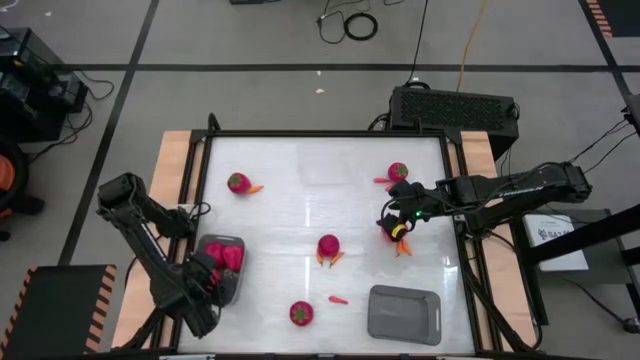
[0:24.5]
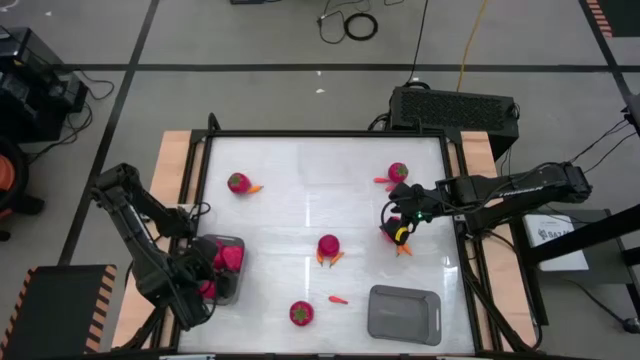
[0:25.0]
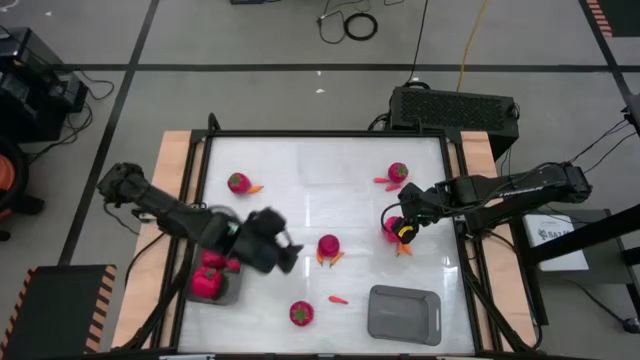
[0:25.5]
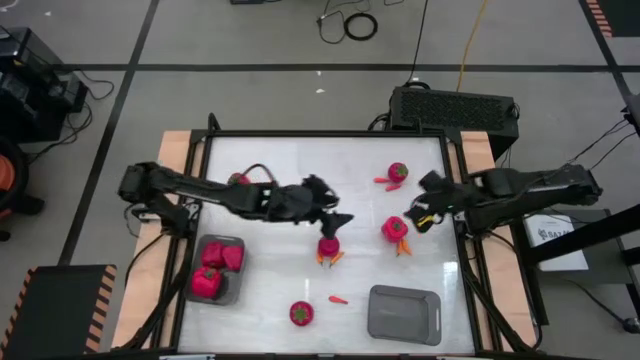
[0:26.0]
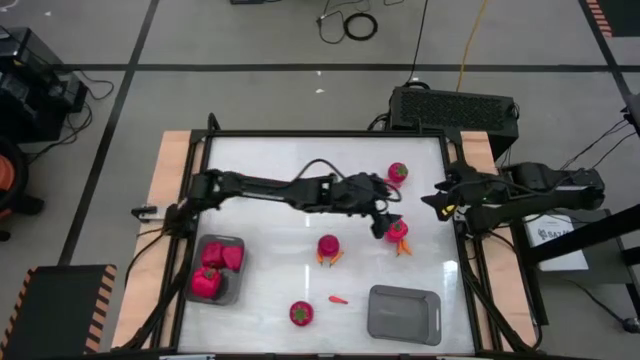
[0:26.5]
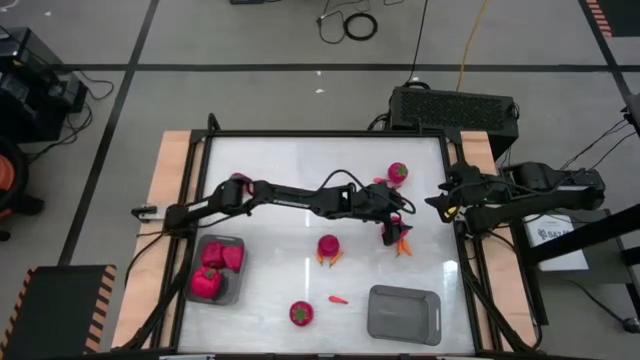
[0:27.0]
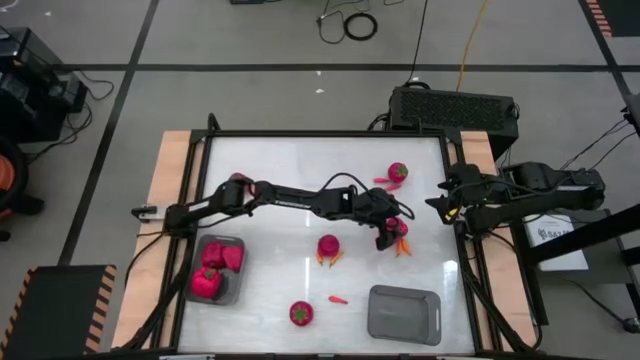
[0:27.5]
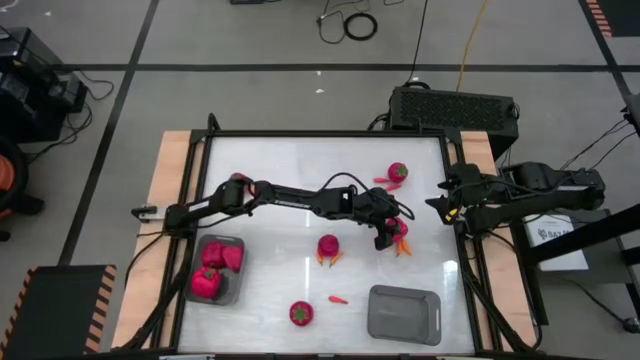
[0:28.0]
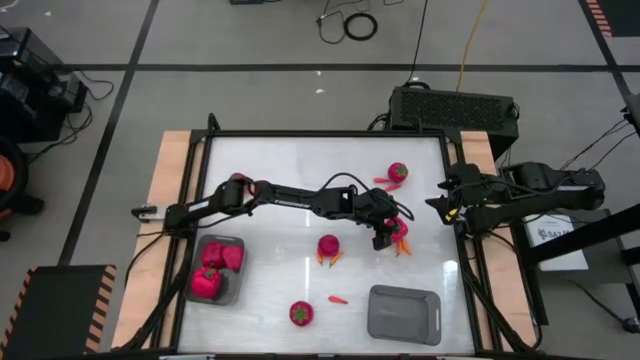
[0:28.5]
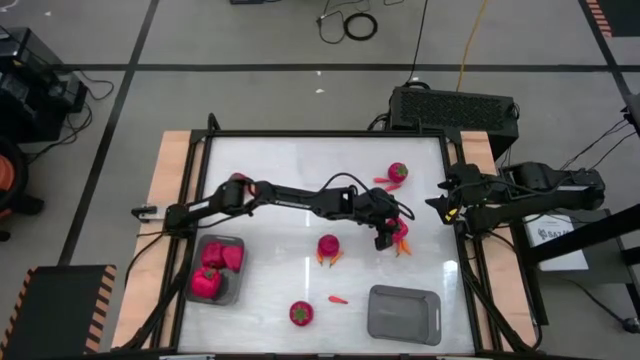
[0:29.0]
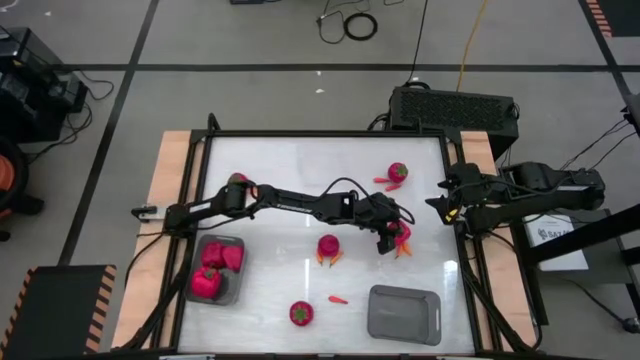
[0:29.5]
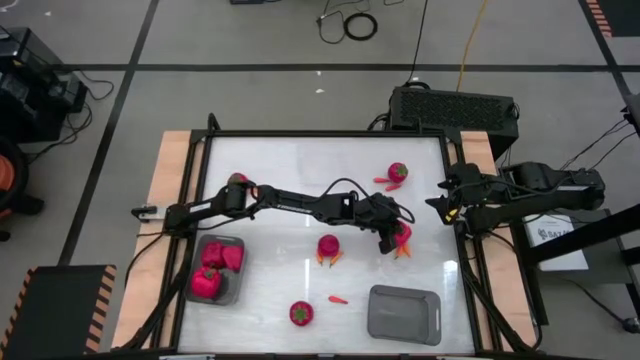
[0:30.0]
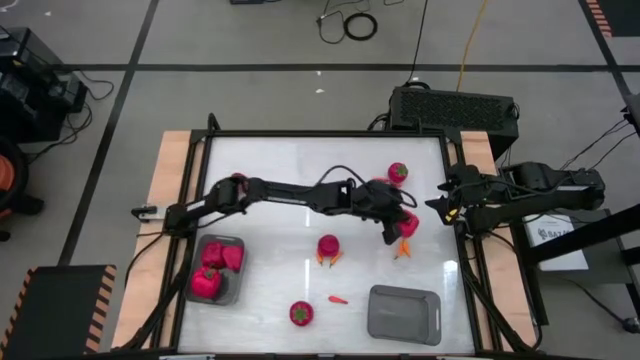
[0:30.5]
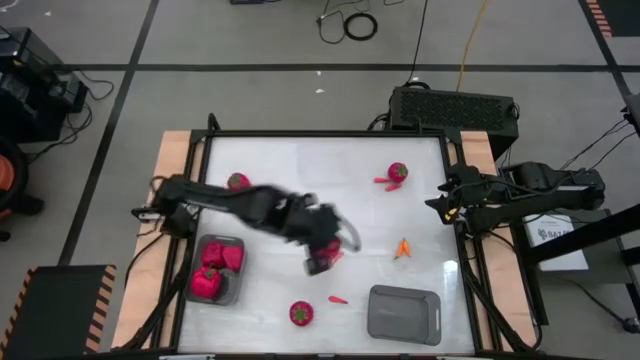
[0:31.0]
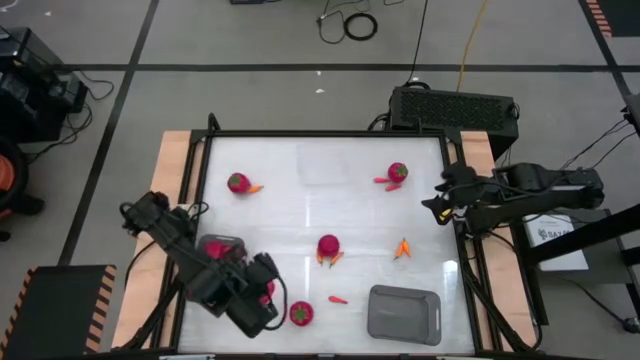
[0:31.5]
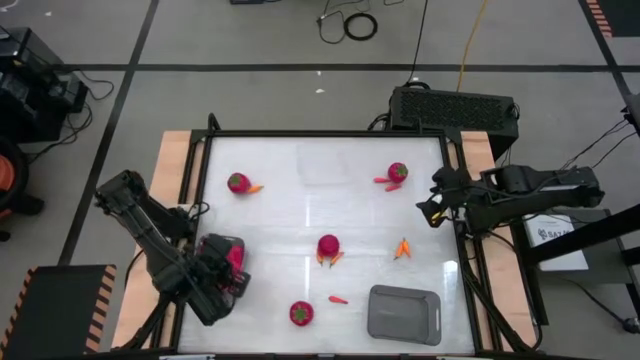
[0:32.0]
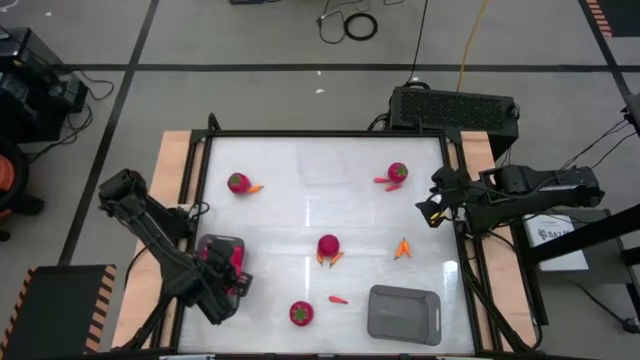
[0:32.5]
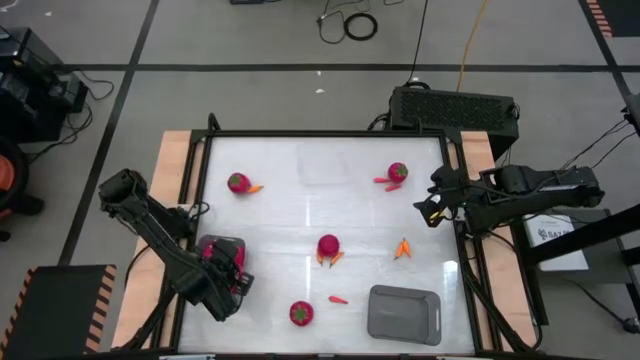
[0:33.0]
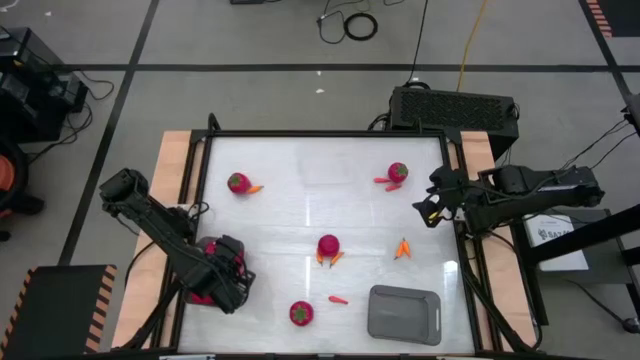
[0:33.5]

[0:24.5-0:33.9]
Task: Sort produce into baskets
Put the bell pepper into the left black bin

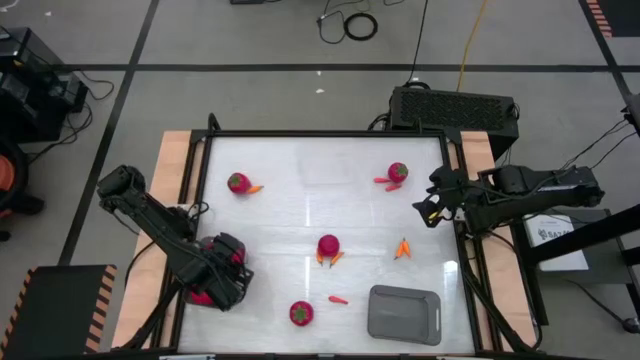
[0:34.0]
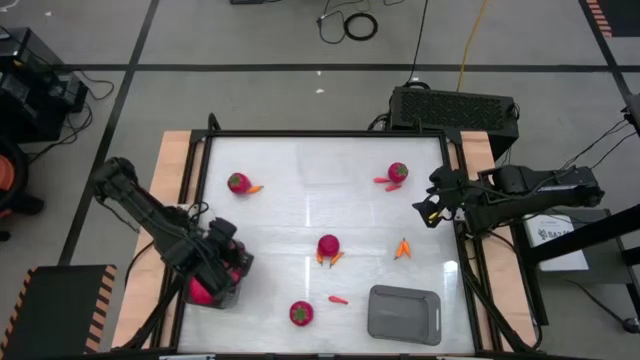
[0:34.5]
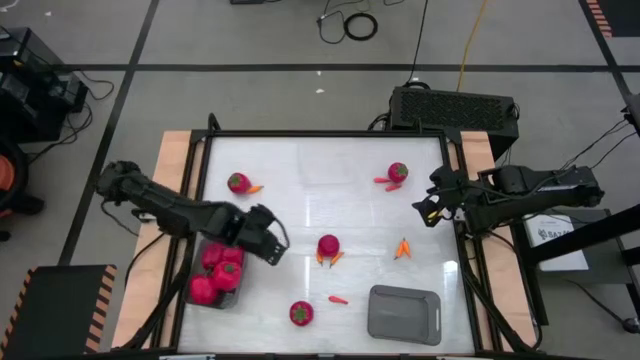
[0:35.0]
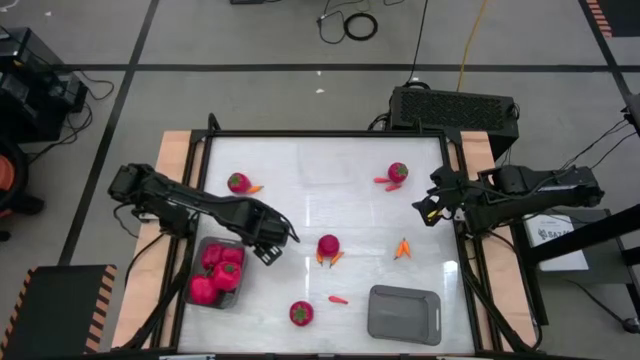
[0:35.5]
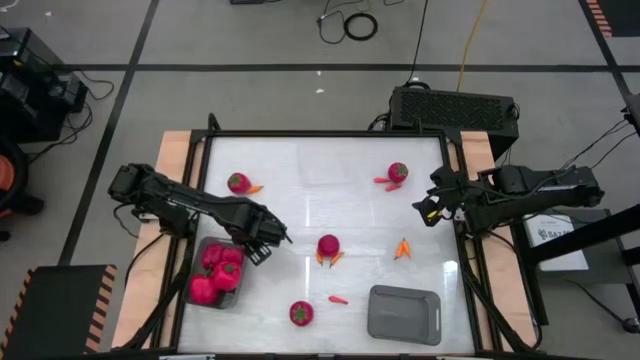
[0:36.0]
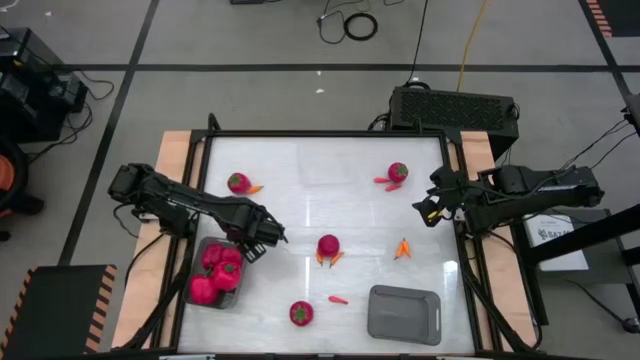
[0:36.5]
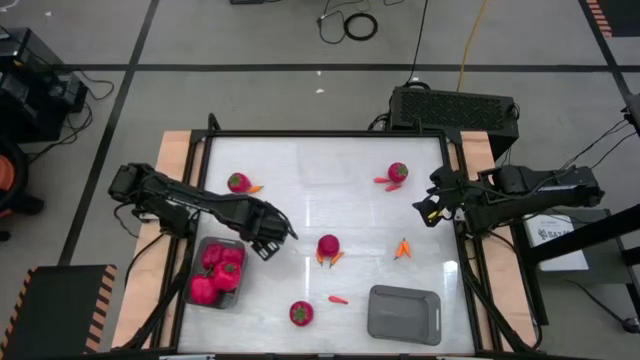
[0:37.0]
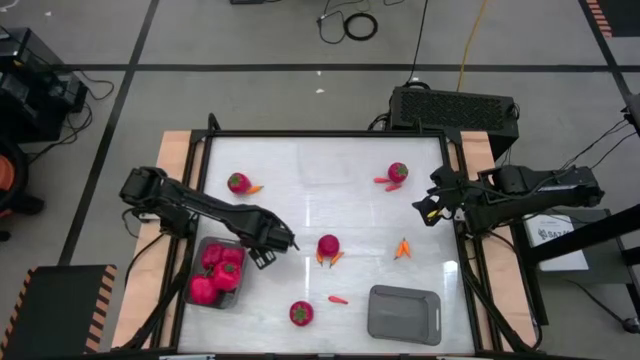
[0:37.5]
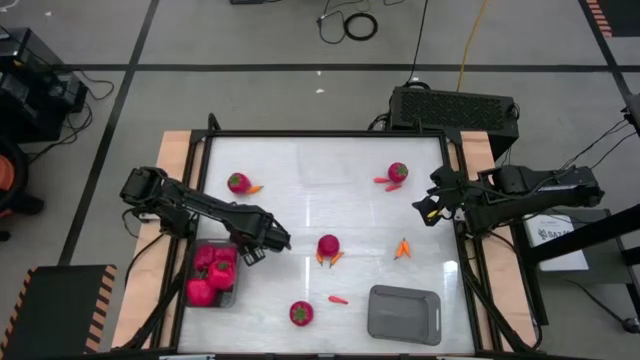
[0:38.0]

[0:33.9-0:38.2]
Adjust the left black bin

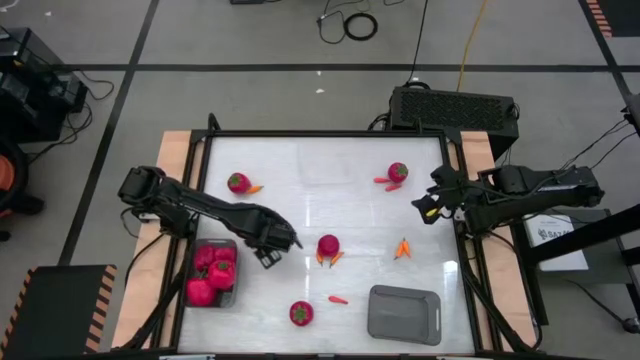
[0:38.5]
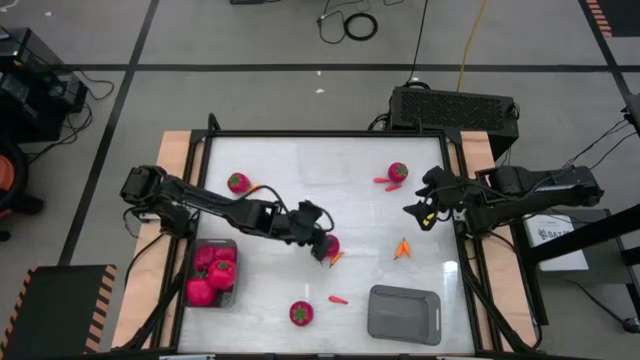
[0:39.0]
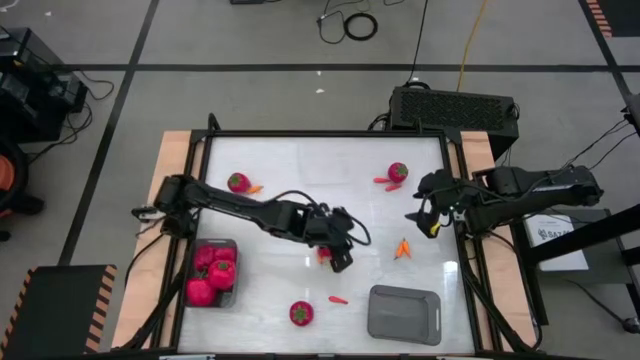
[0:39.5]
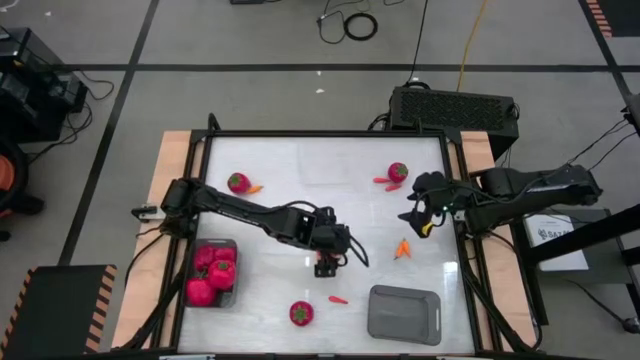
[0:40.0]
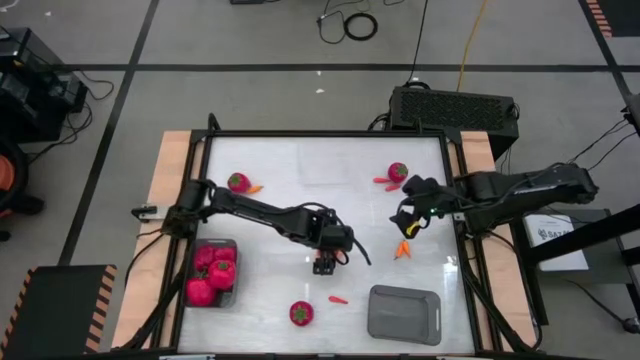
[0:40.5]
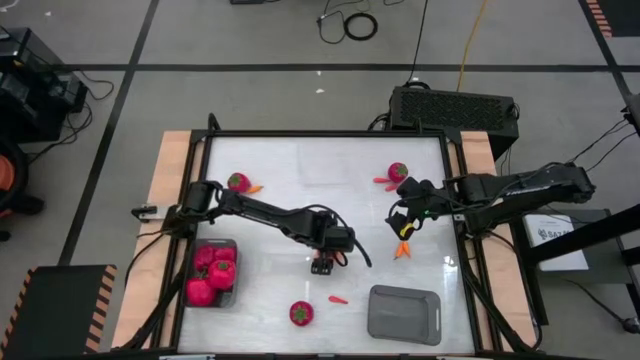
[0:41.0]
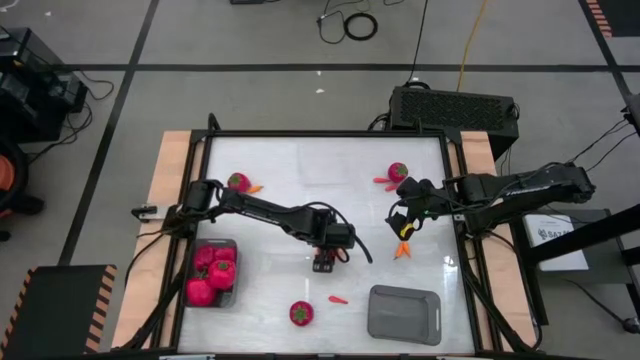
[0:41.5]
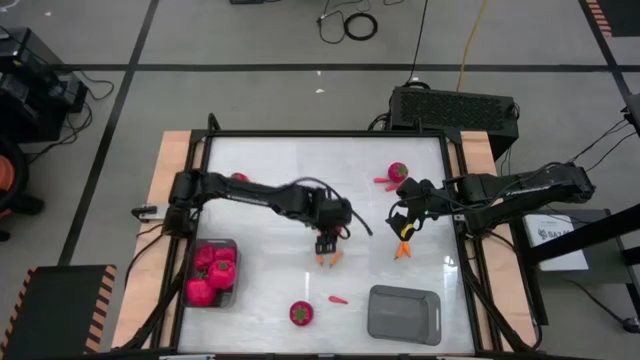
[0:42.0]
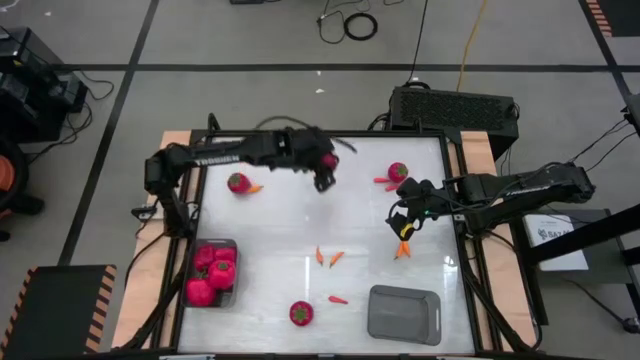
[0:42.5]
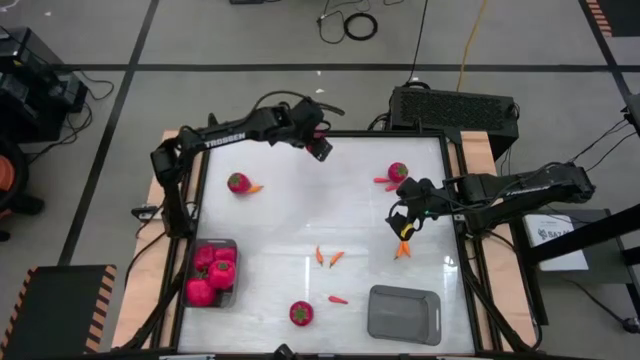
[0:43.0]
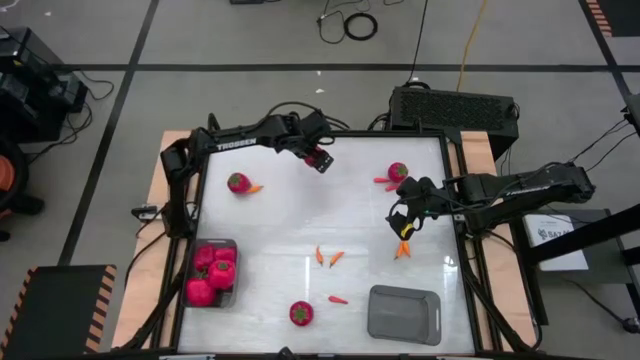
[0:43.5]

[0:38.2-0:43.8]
Put the tomato into the transparent bin

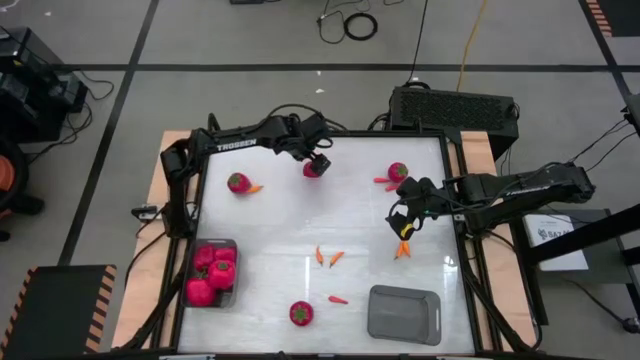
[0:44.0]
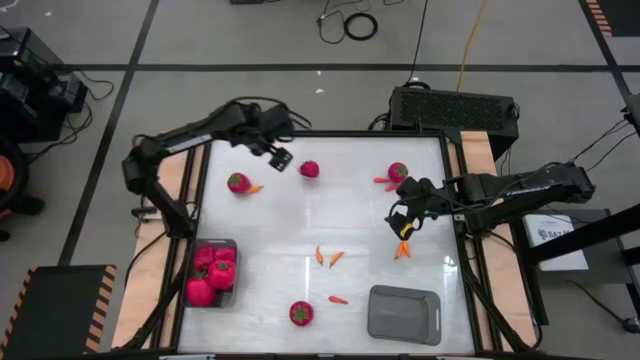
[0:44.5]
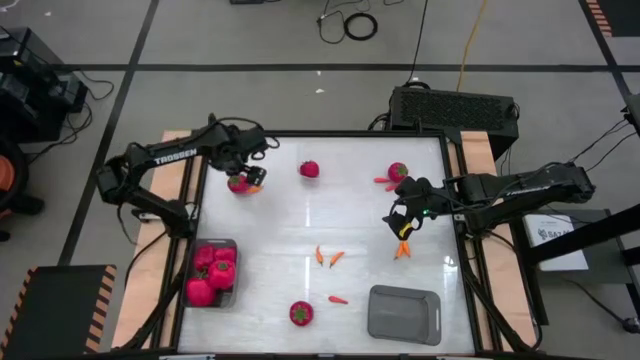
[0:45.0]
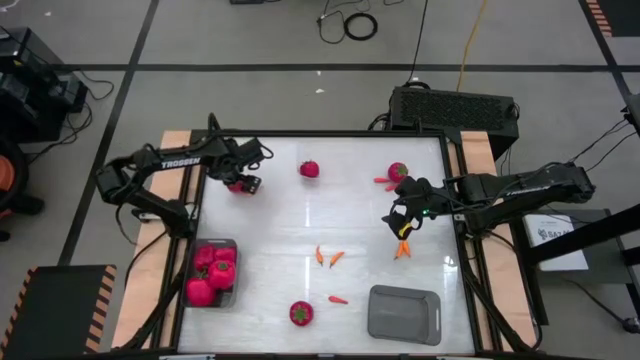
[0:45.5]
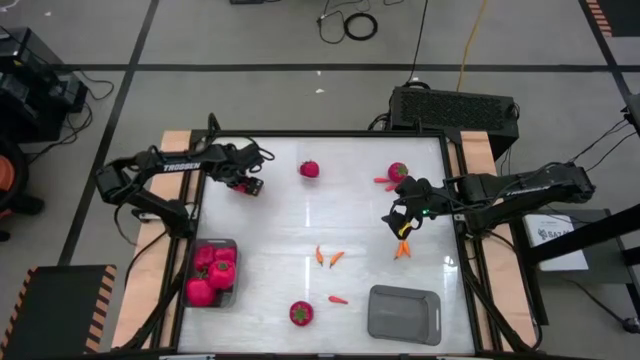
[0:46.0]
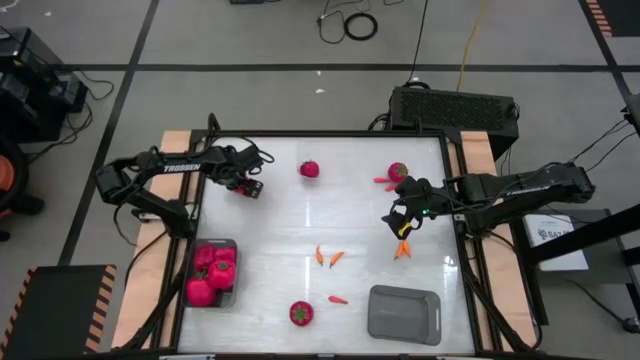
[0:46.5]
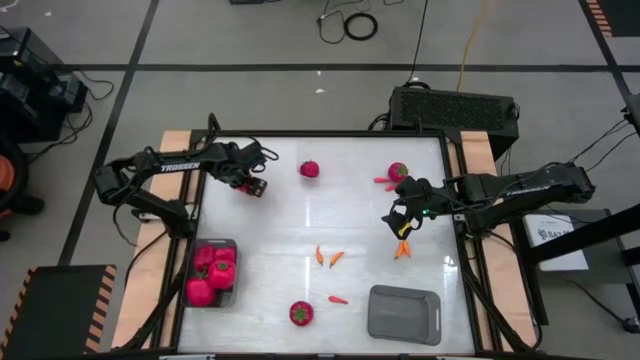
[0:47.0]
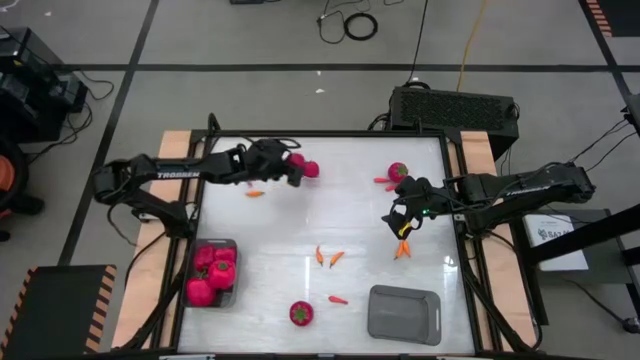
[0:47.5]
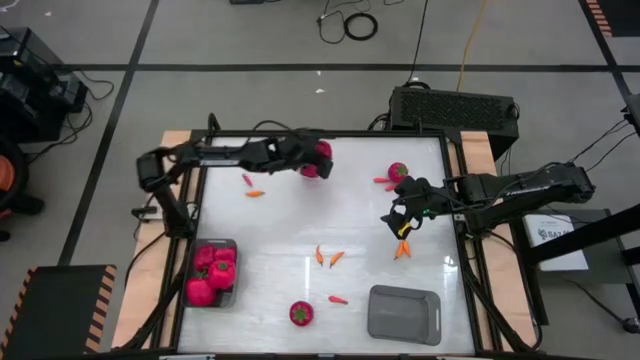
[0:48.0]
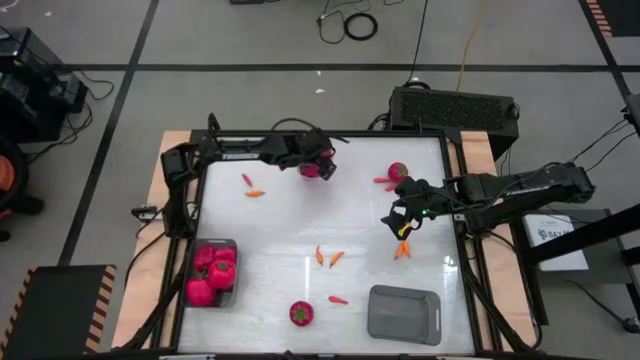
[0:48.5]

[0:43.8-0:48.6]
Put the tomato into the transparent bin
